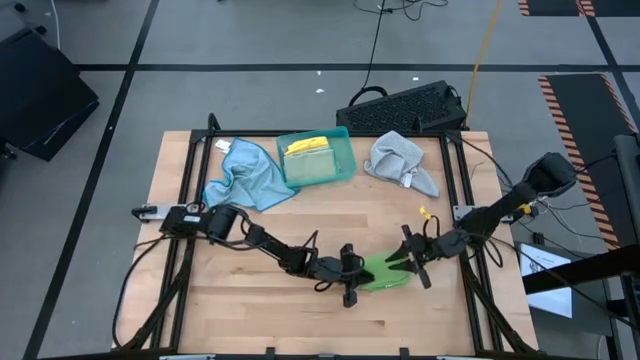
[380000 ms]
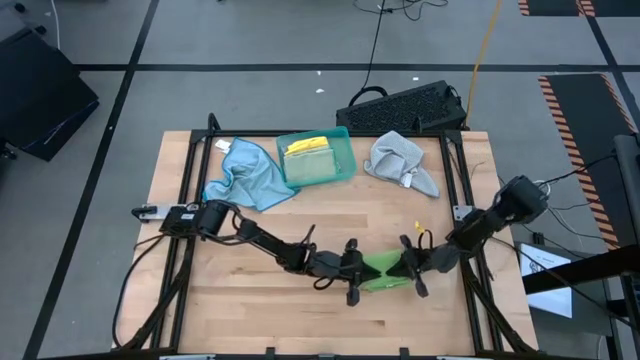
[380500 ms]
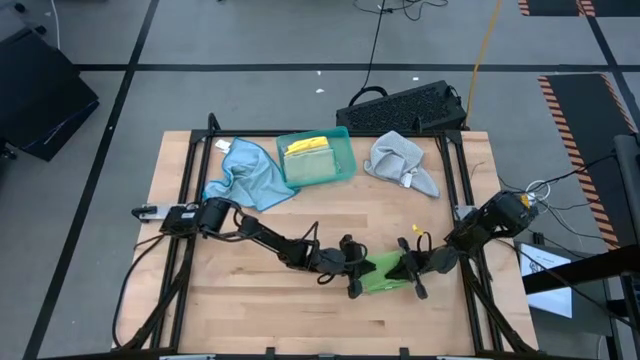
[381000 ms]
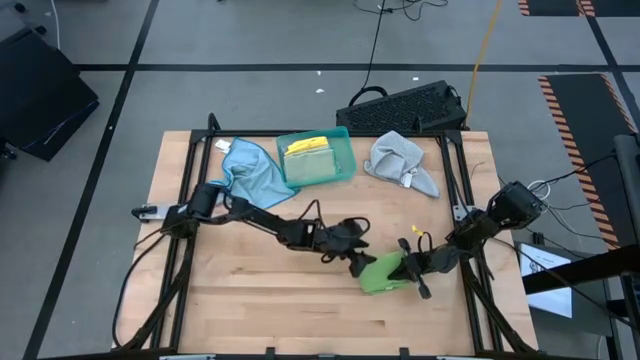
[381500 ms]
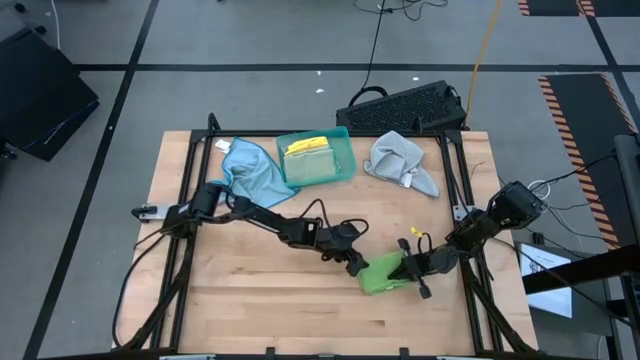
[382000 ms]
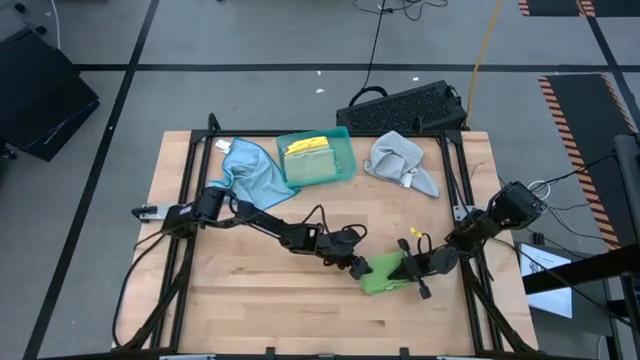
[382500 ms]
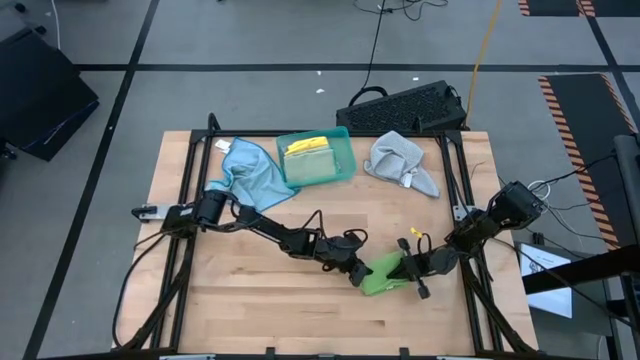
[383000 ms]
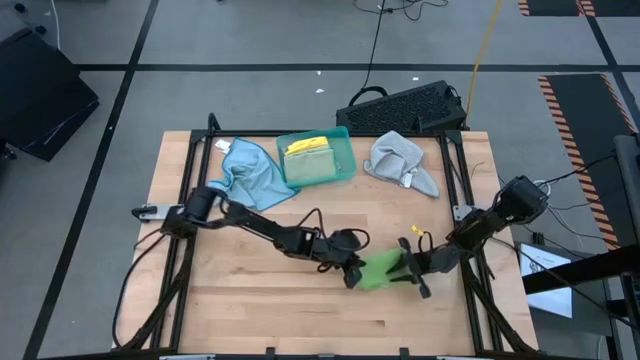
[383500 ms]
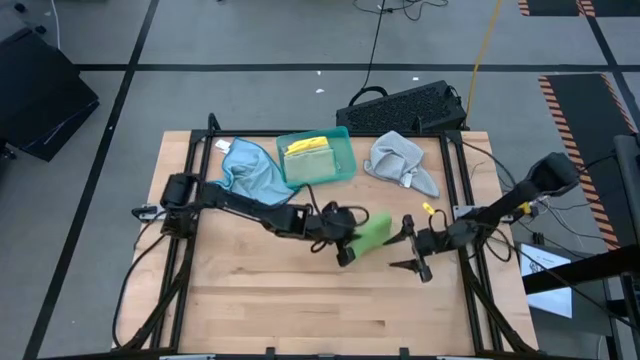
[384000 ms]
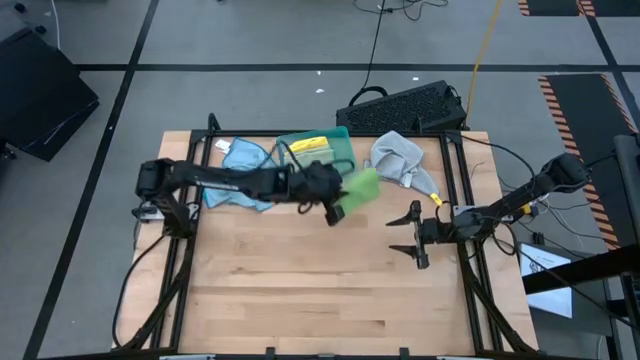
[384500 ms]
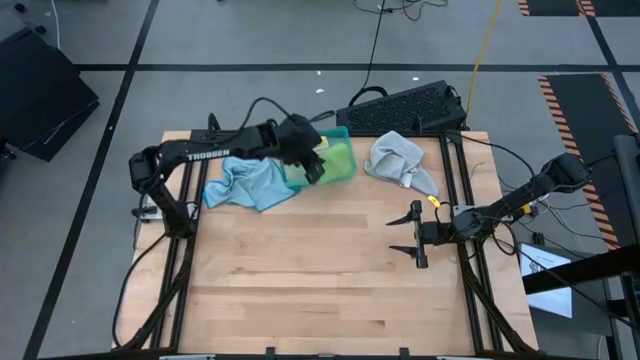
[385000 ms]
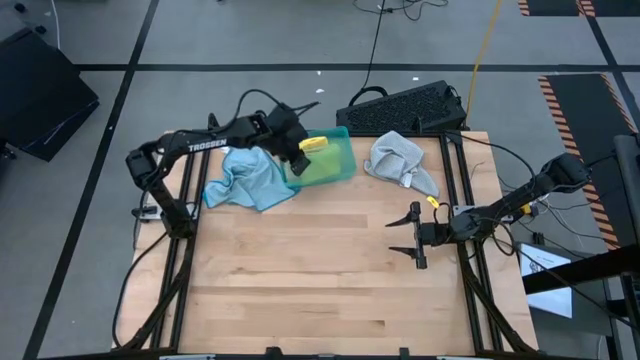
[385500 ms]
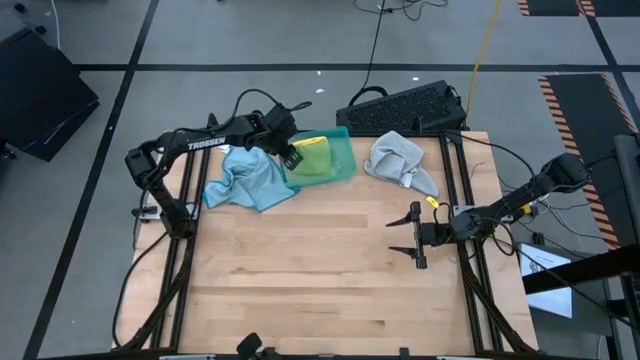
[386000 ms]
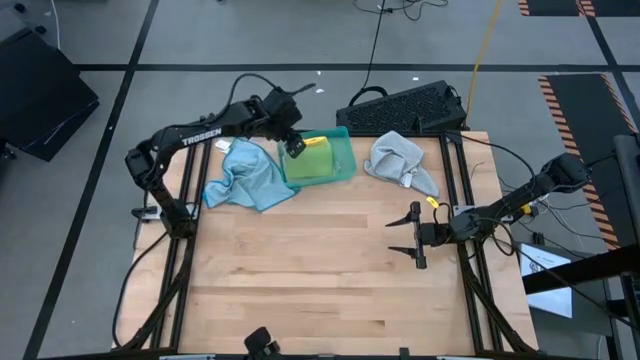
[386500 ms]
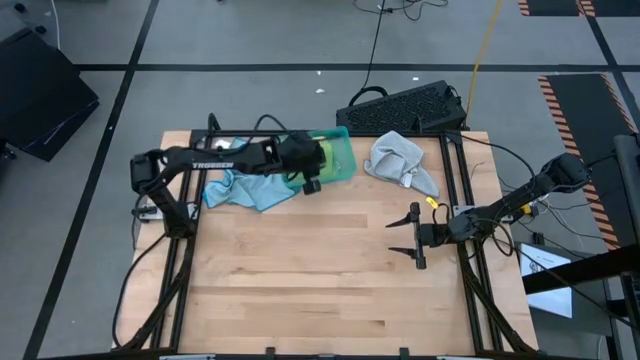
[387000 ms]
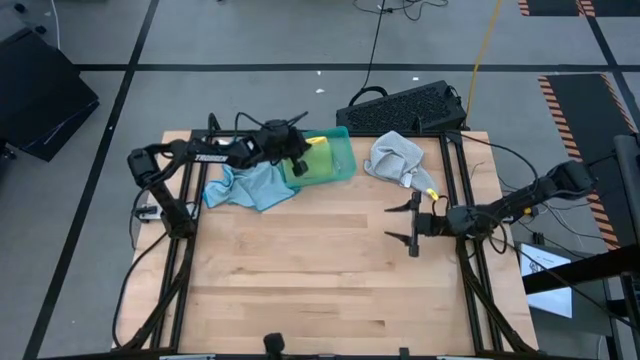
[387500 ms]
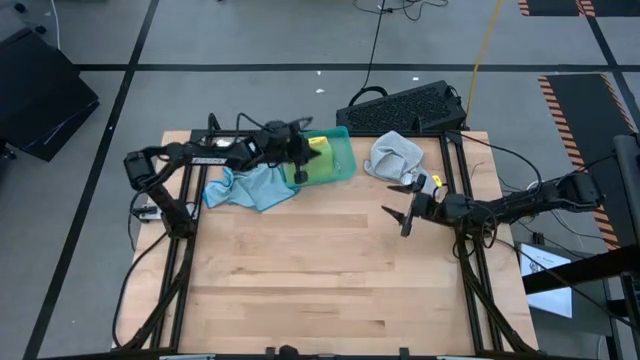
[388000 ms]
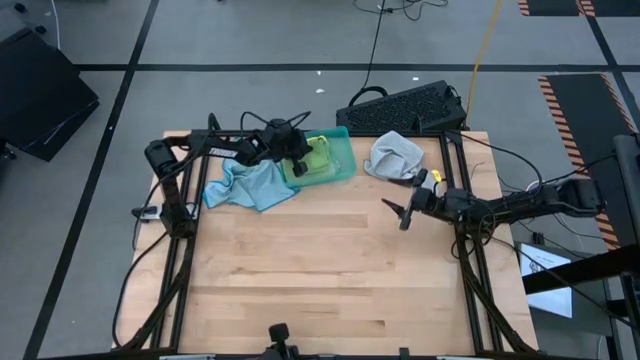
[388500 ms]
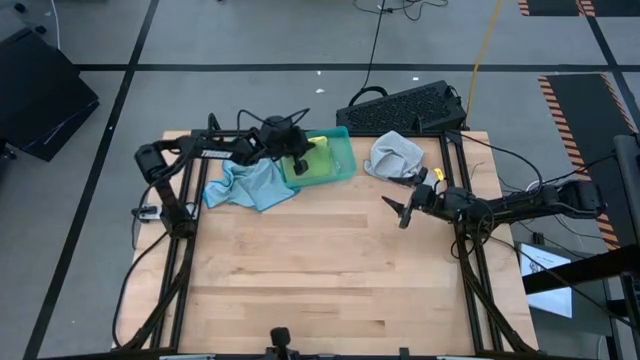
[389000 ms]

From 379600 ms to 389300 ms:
Task: Fold microfiber towels
Stack the folded green microfiber cloth on top of the folded light green microfiber cloth into the green bin

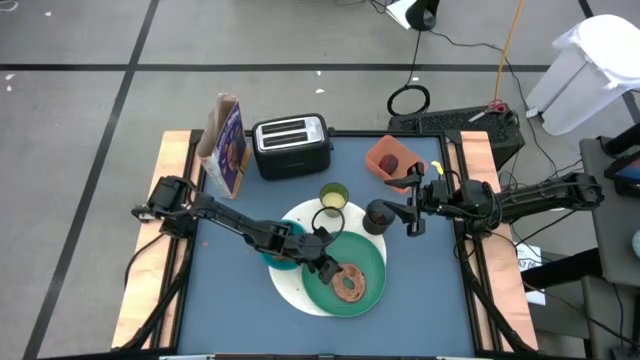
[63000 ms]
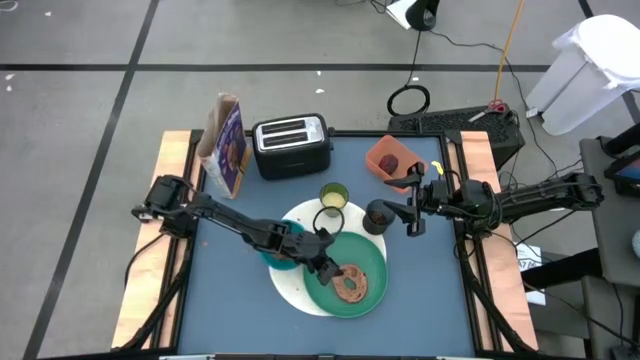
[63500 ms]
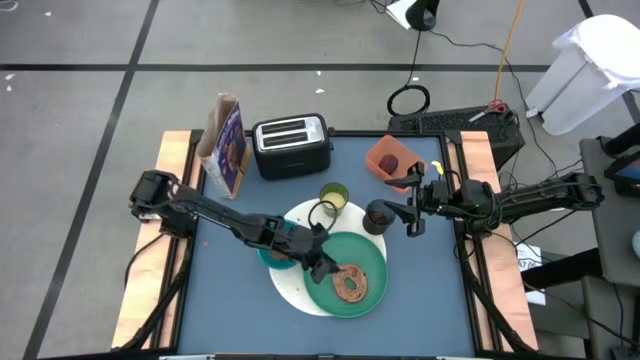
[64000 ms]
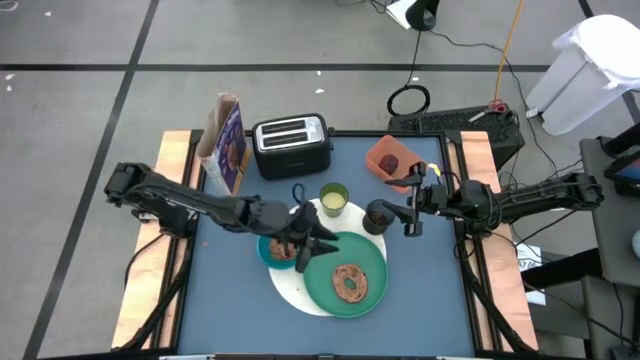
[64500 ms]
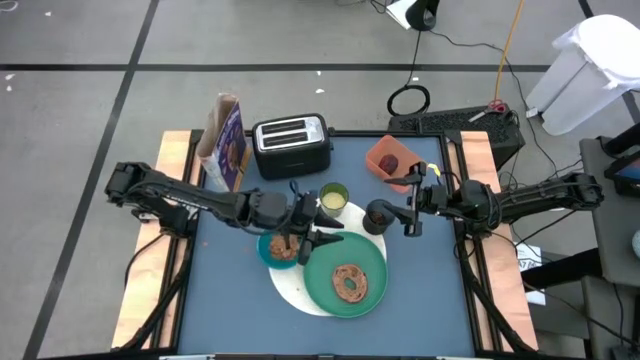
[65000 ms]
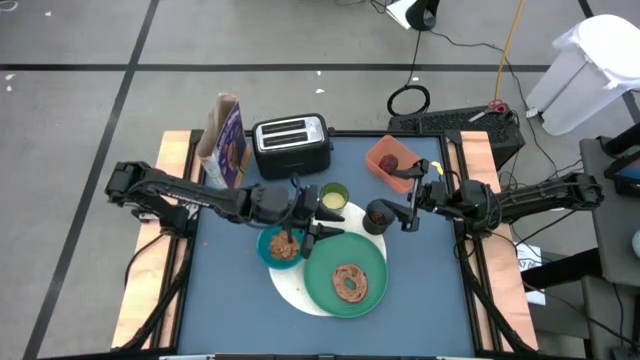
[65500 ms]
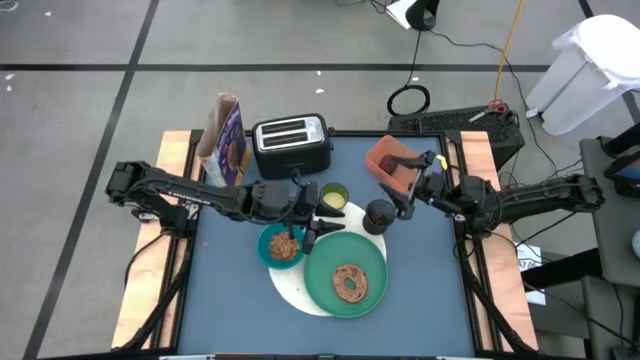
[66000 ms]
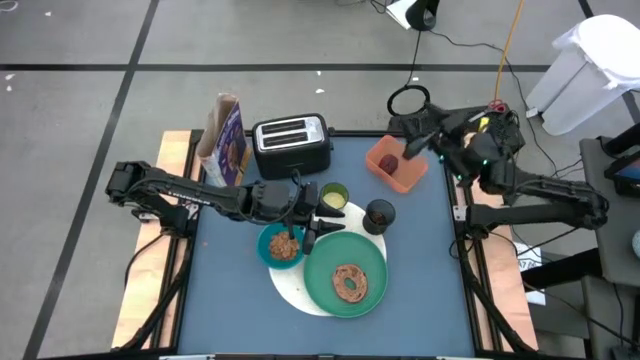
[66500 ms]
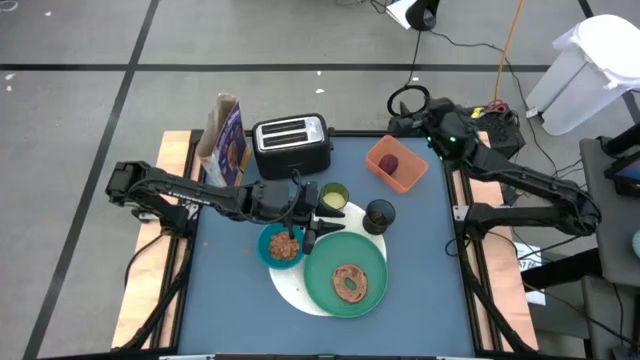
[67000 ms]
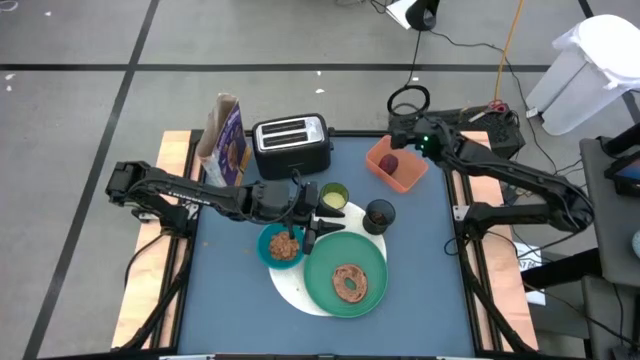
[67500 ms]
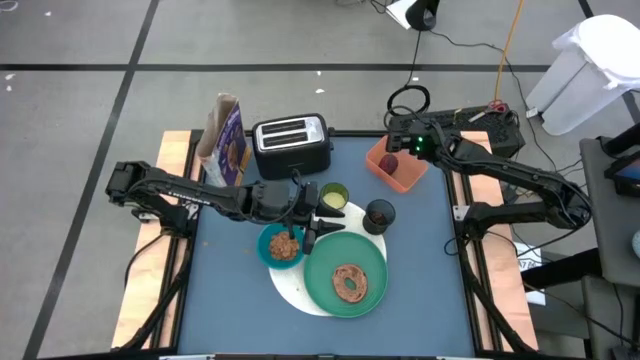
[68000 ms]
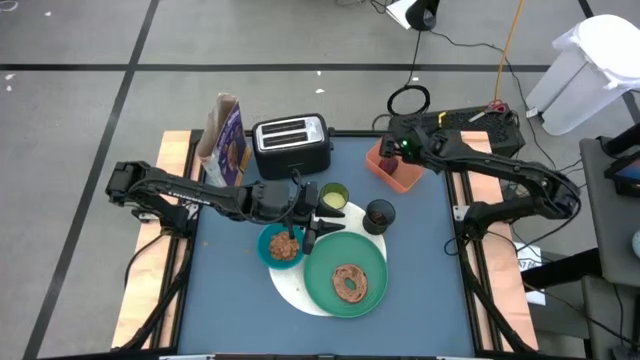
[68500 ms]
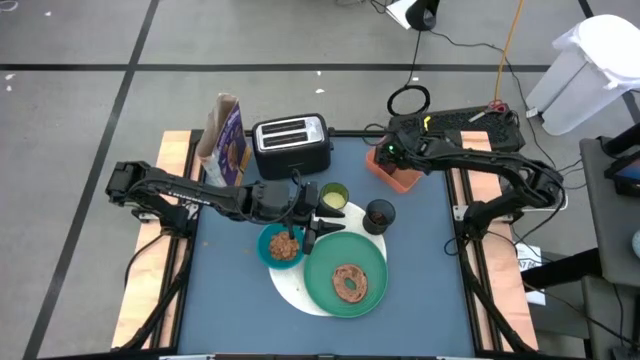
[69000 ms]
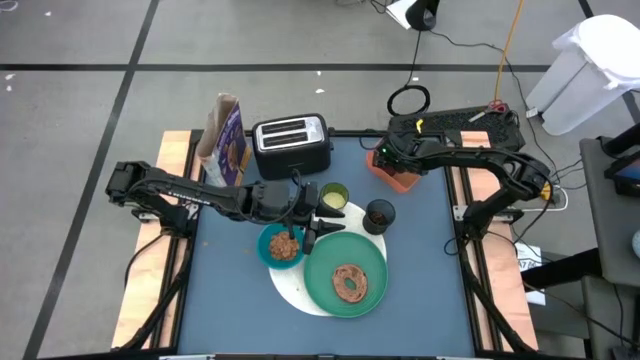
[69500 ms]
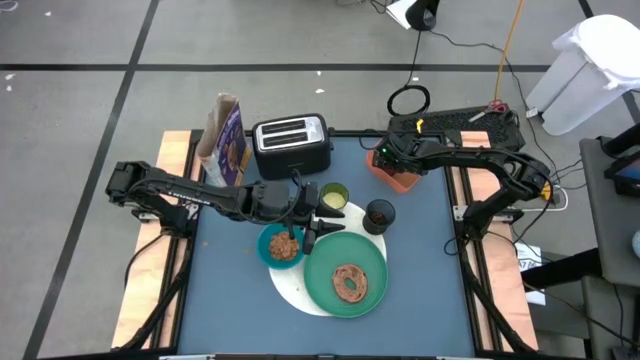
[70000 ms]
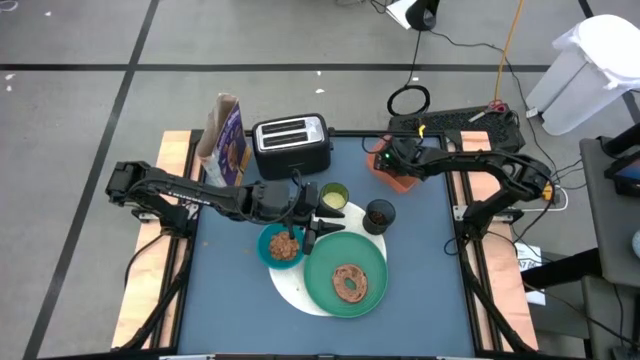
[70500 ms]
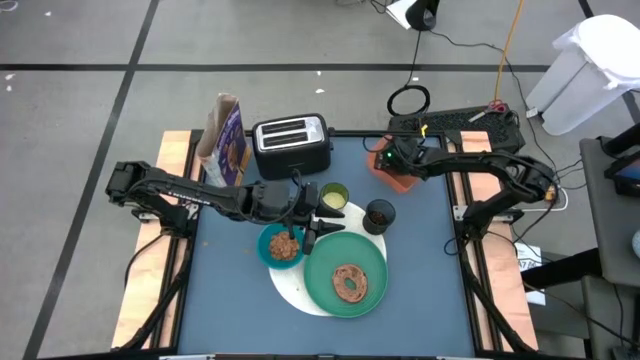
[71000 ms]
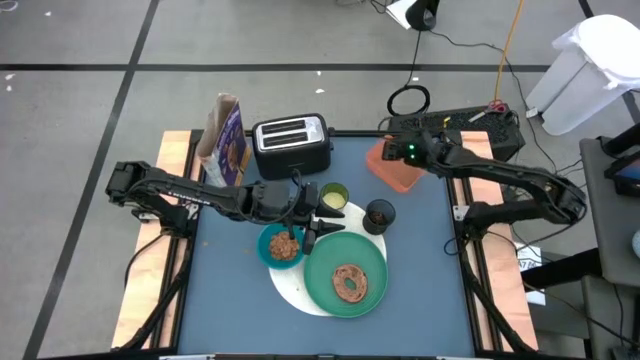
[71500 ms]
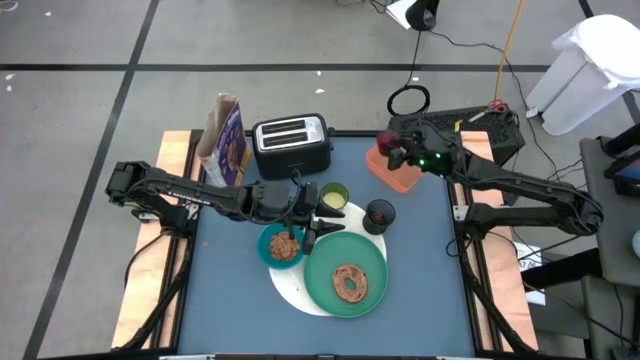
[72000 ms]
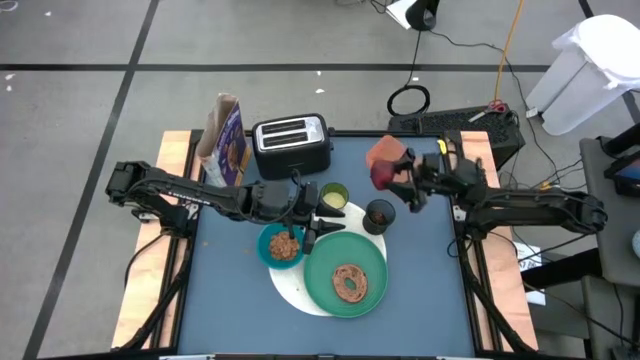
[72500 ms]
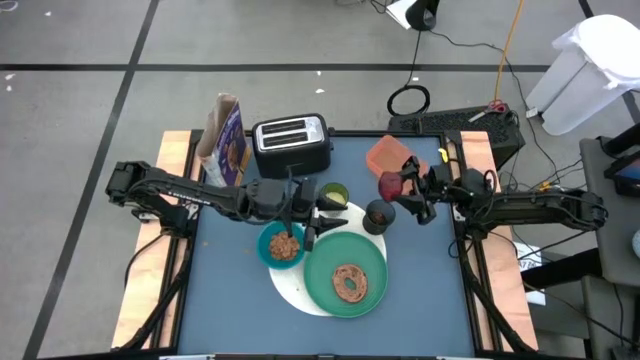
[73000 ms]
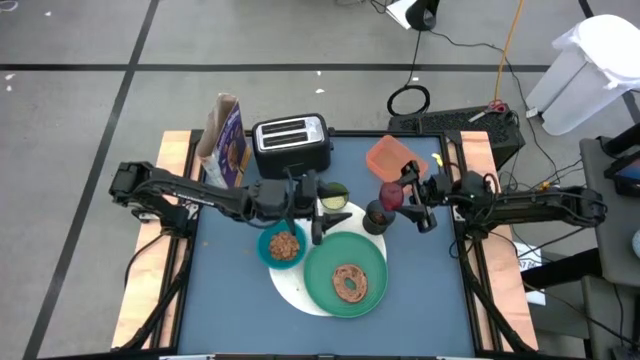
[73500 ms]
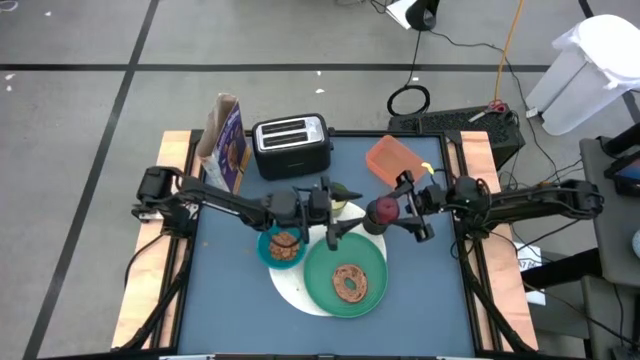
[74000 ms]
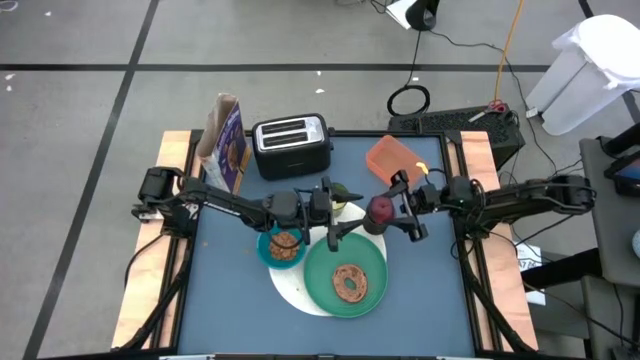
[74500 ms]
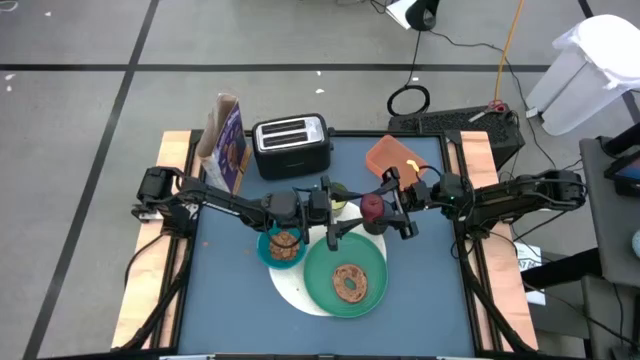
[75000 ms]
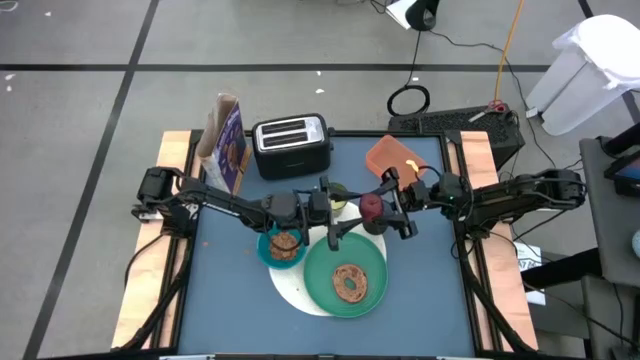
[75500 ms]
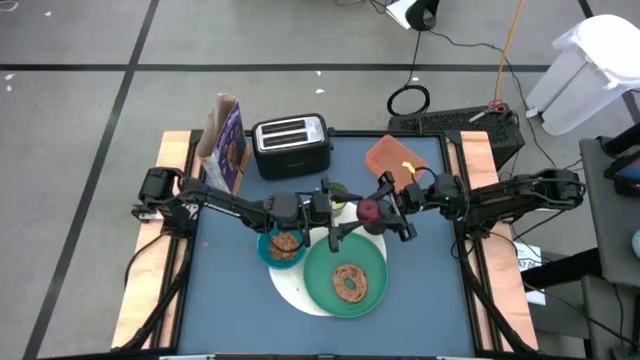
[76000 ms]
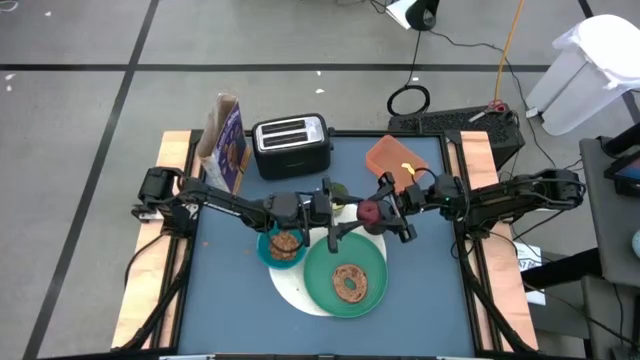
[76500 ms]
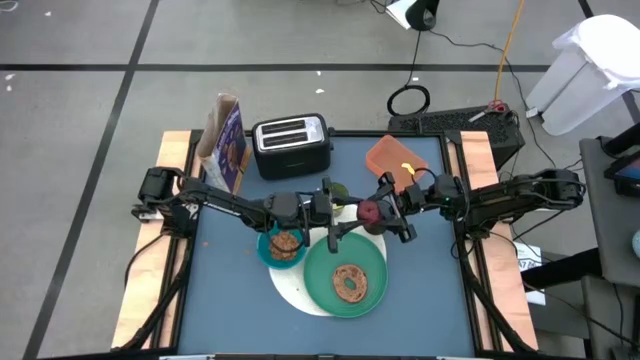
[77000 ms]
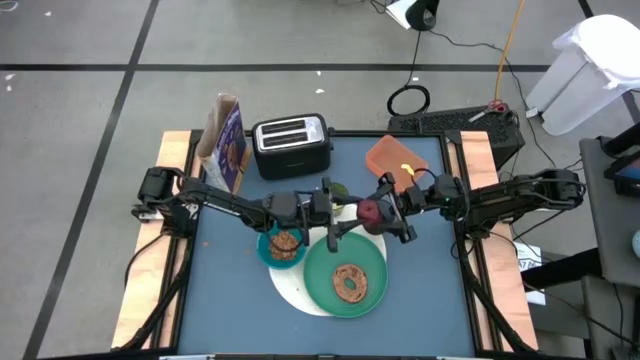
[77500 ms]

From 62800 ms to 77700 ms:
Task: Arrange a breakfast setting
Put the red apple on the white mat
